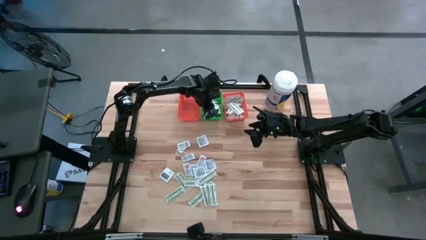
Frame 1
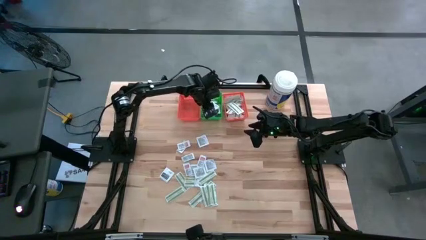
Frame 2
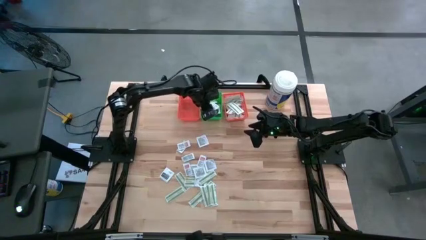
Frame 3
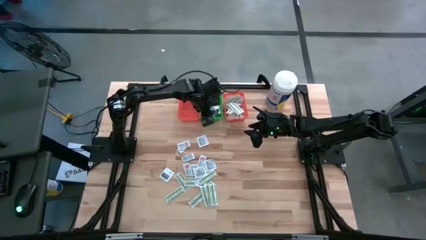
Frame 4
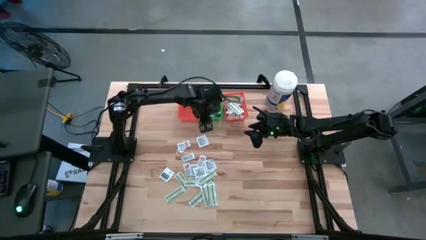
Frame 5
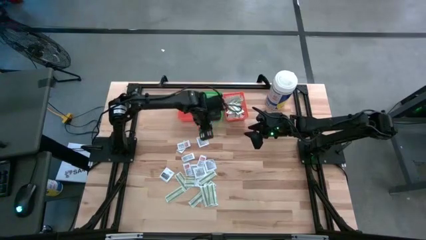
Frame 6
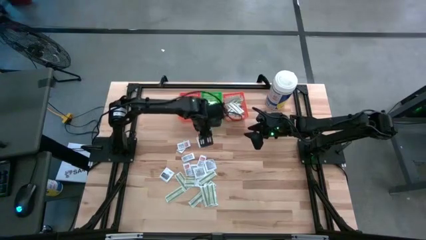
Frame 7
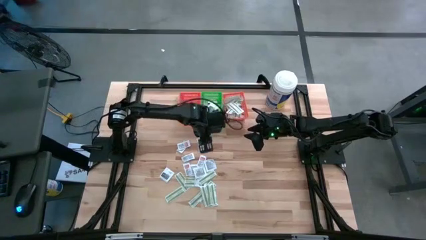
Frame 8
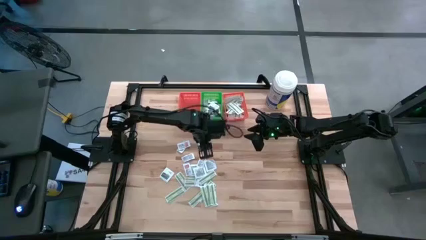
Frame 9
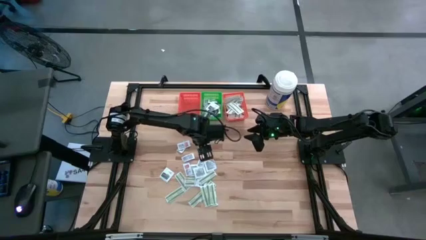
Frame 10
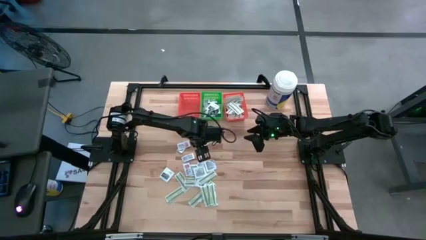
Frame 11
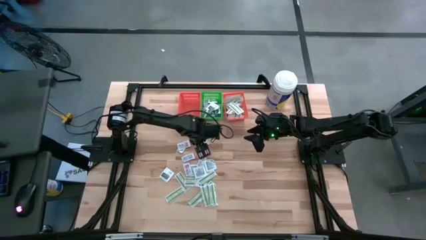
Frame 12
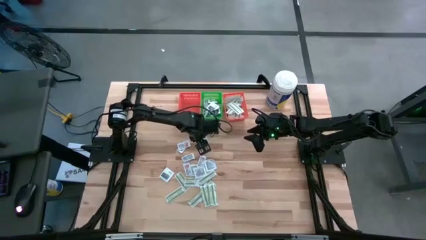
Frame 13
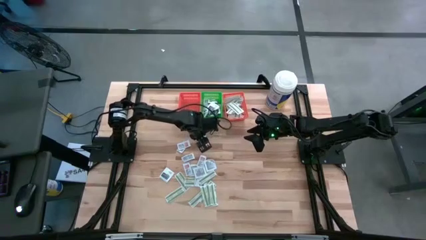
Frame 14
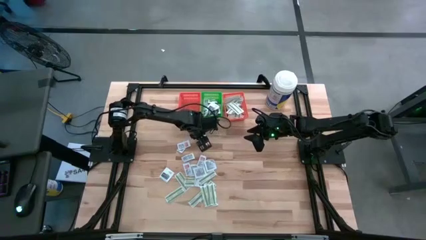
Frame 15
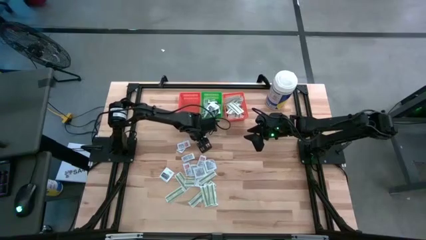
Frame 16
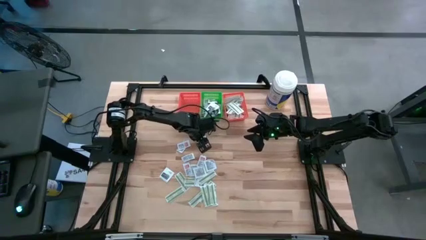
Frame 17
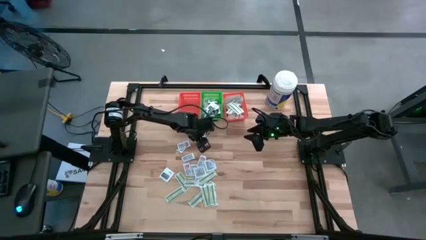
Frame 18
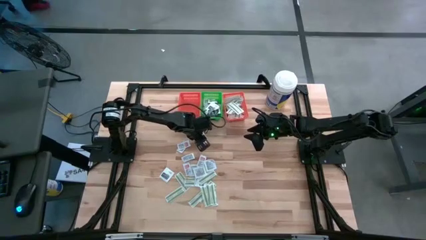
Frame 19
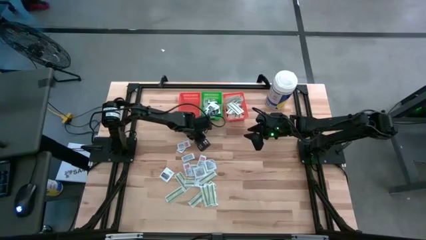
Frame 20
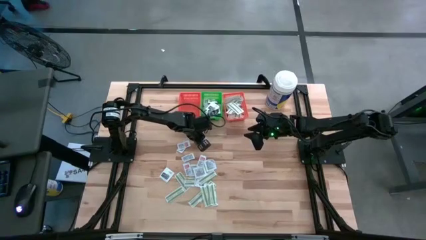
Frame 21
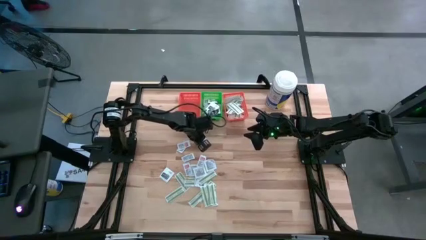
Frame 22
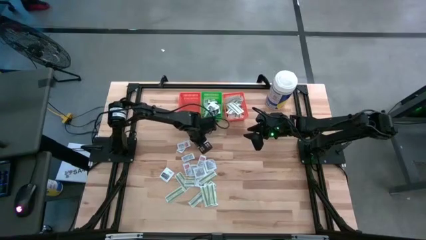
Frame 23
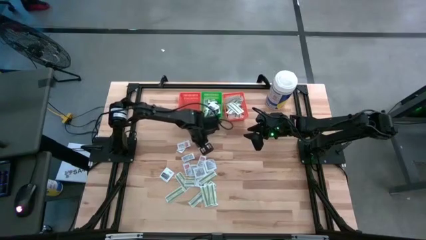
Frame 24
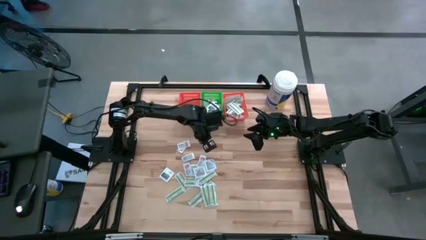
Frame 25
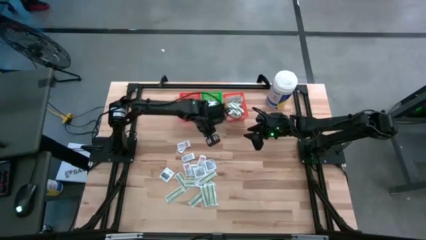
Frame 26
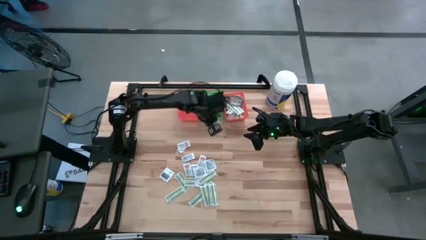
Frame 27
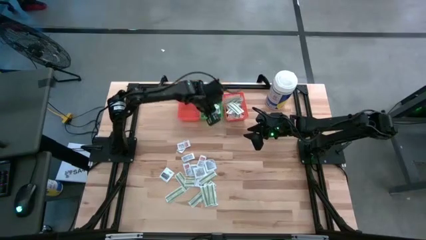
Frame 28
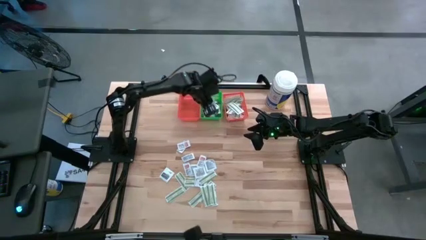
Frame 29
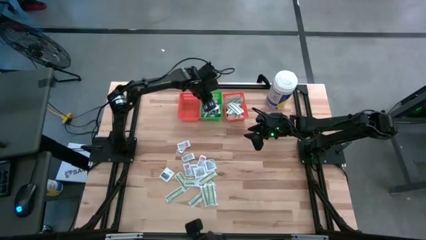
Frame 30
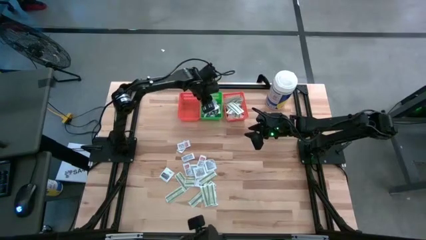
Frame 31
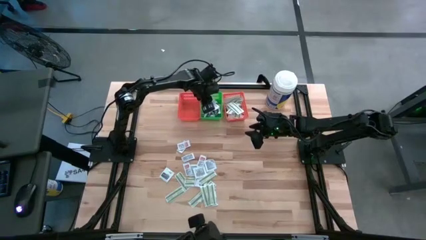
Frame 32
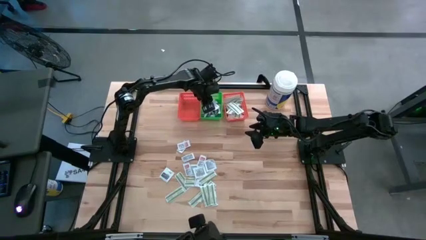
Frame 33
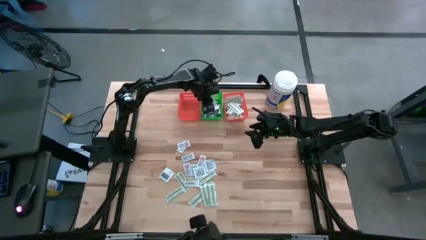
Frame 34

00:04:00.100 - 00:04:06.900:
Task: Pick & Place First Aid Supplies
Put the towelette pack into the green bin

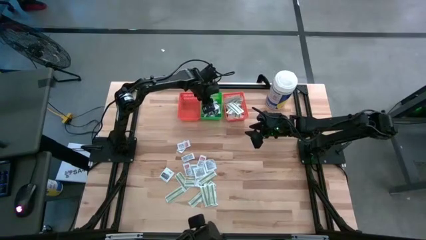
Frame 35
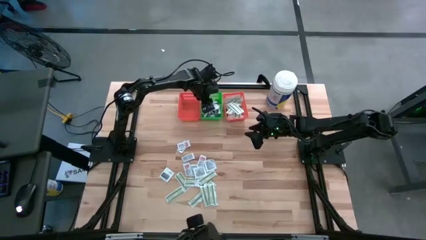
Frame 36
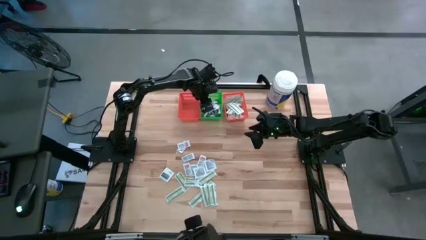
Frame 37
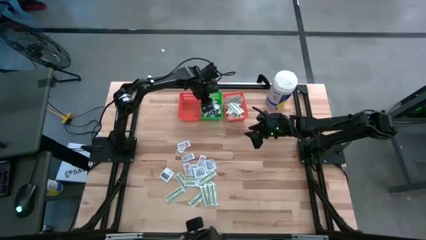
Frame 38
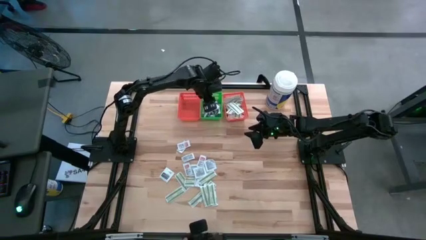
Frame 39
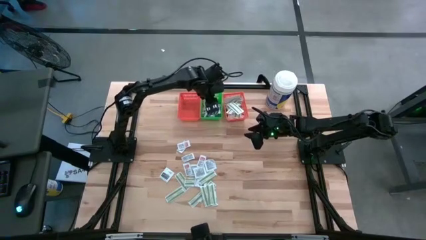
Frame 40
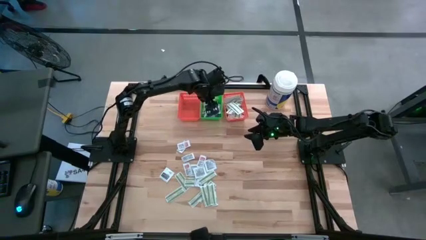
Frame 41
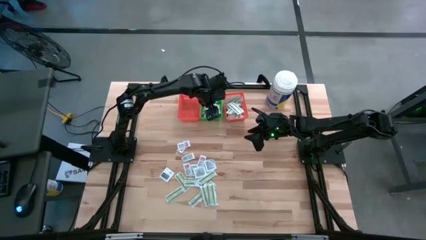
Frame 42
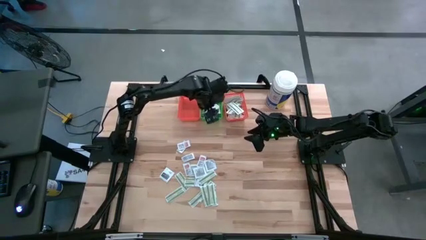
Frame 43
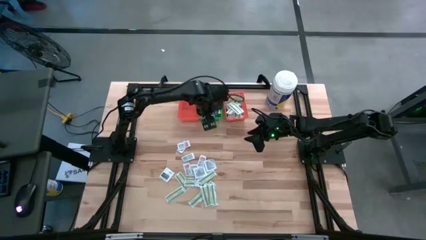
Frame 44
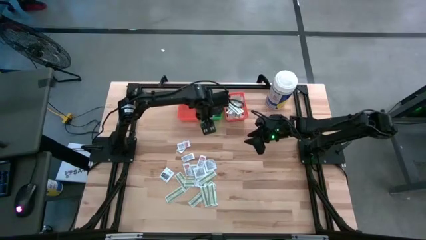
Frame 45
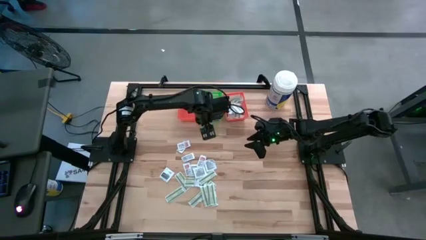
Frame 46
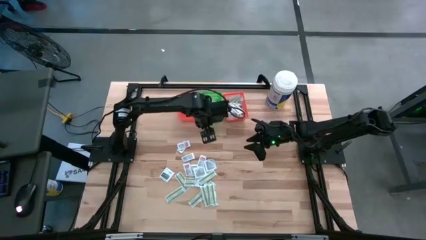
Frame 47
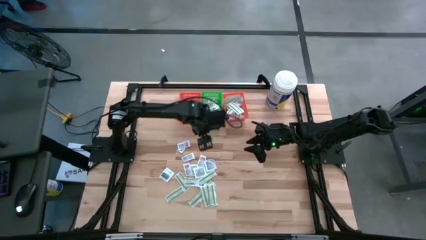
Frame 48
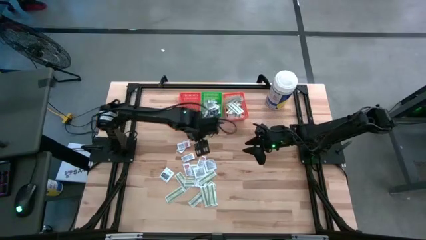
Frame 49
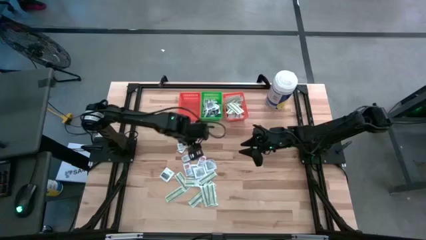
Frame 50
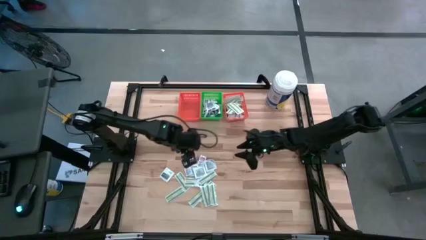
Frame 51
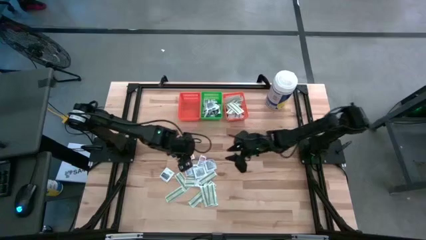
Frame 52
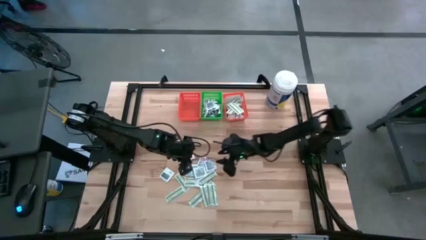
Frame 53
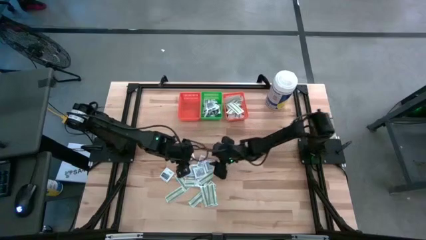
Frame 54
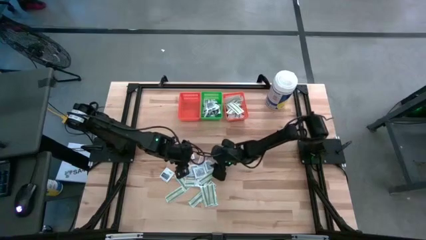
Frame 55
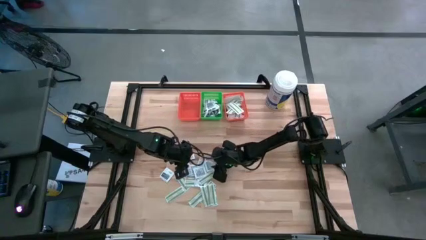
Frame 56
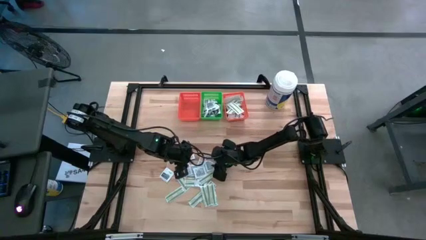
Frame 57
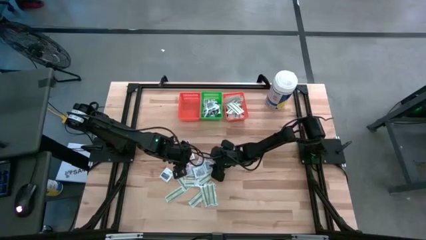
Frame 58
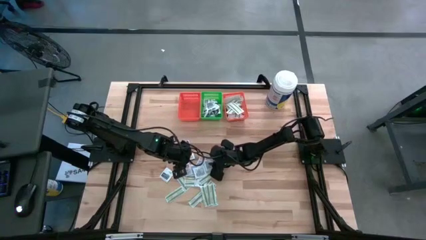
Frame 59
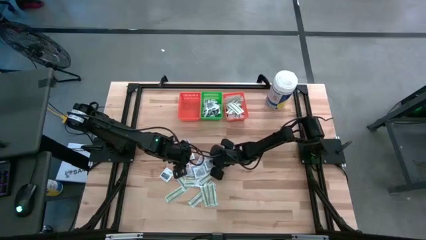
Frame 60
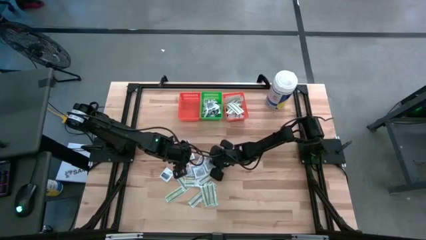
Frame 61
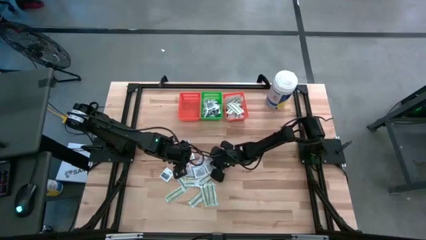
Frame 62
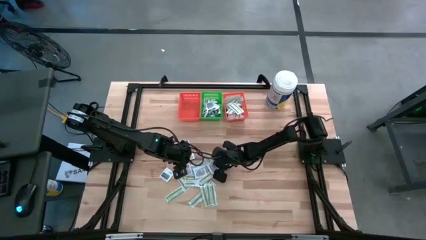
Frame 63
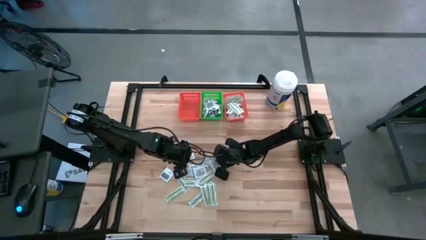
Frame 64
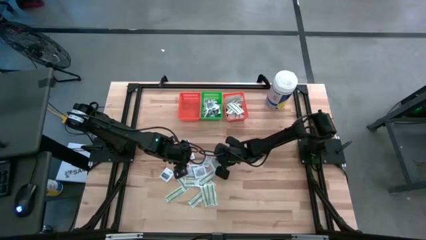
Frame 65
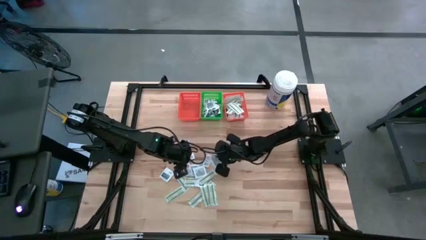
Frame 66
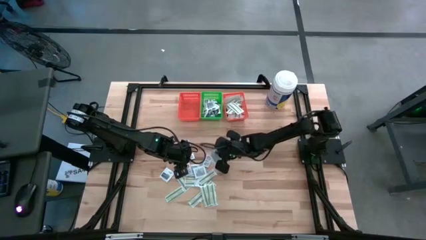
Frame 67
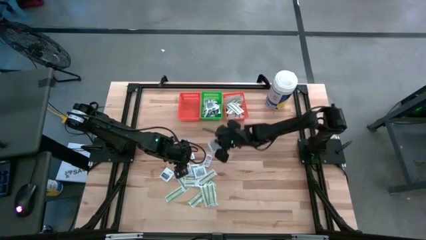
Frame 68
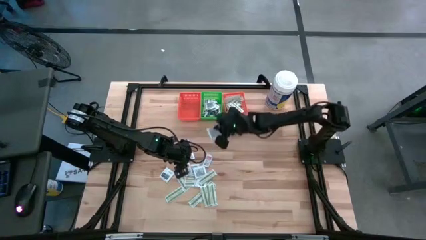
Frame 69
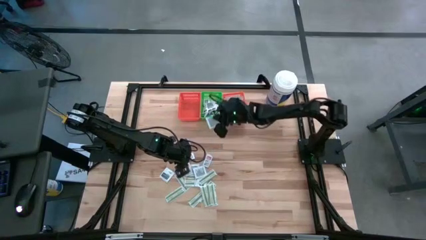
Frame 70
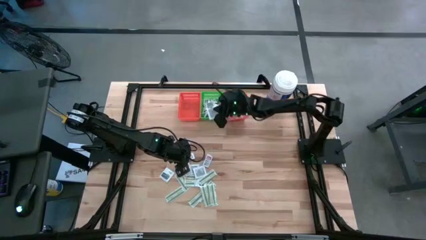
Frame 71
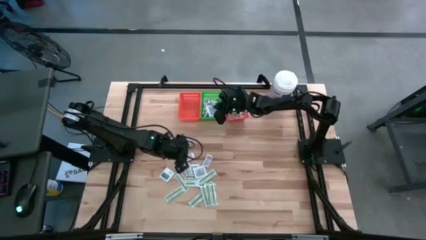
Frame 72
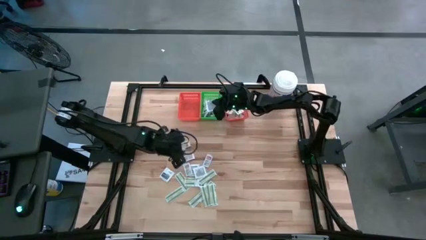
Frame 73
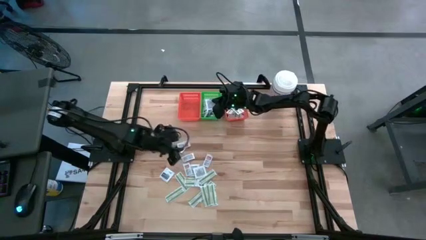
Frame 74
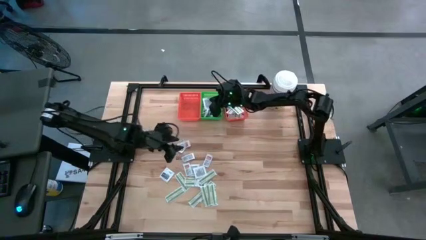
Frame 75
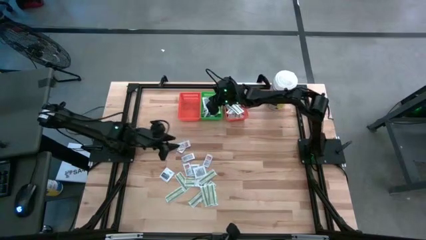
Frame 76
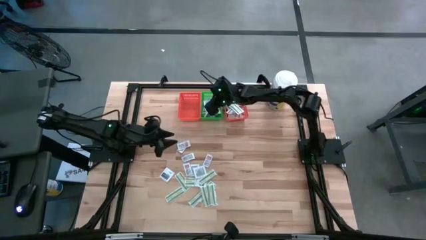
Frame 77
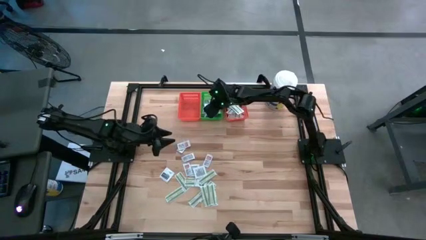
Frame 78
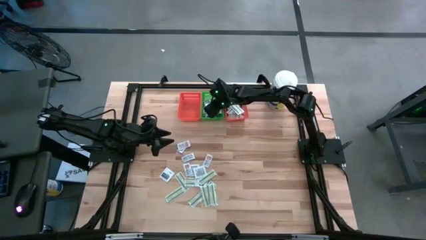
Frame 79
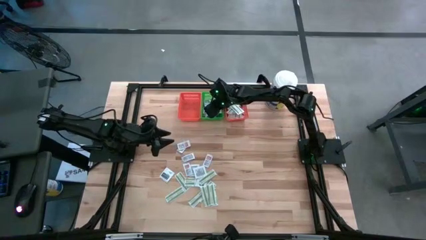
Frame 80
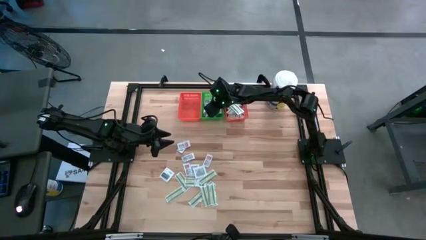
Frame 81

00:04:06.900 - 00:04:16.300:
Put the towelette pack into the green bin
